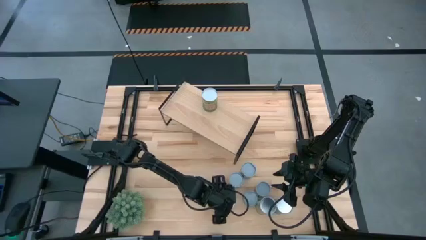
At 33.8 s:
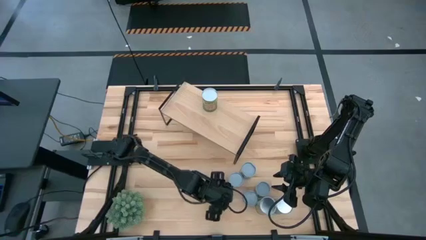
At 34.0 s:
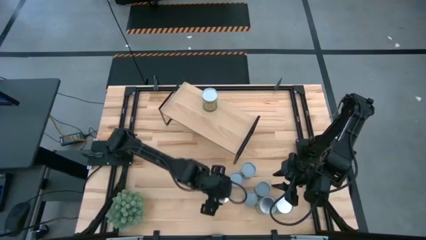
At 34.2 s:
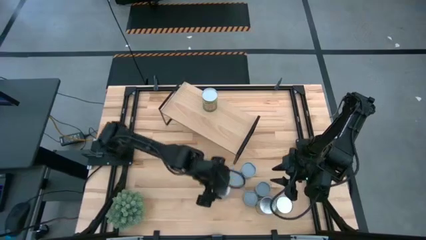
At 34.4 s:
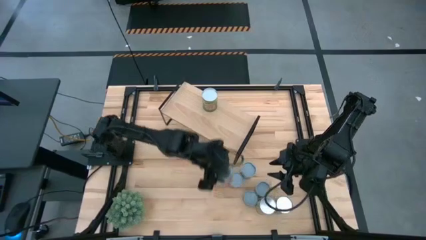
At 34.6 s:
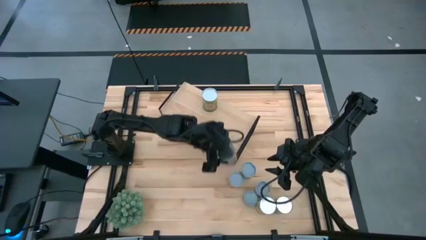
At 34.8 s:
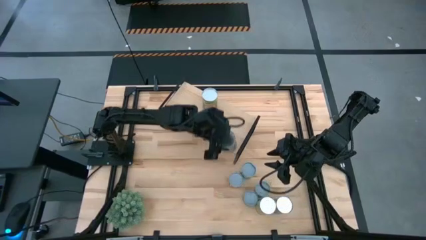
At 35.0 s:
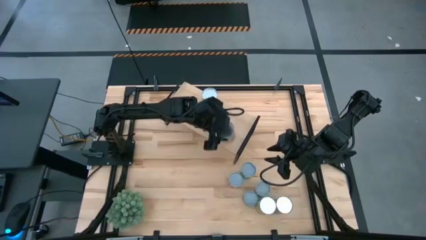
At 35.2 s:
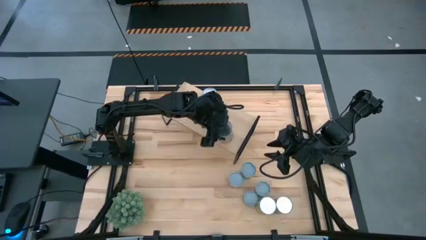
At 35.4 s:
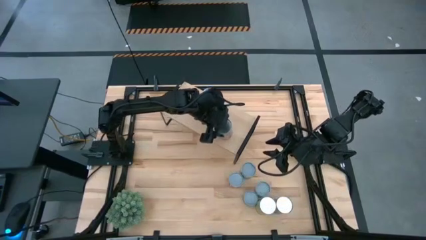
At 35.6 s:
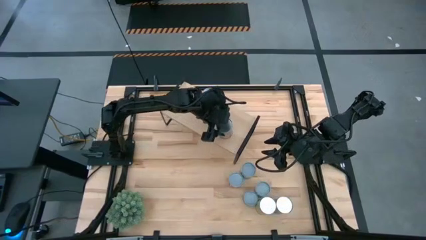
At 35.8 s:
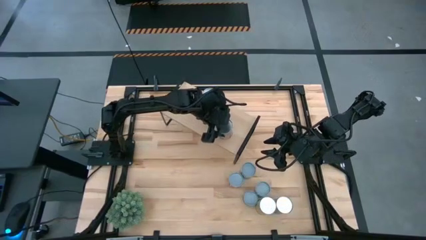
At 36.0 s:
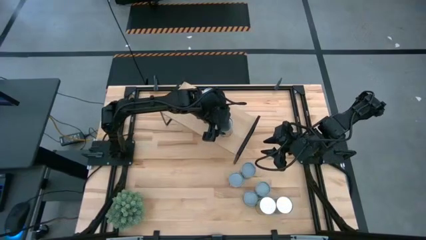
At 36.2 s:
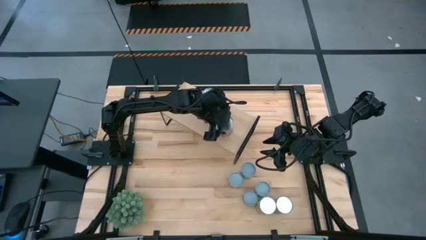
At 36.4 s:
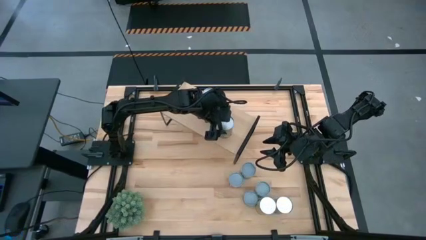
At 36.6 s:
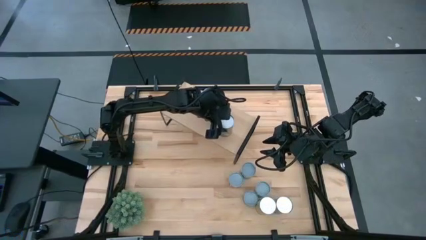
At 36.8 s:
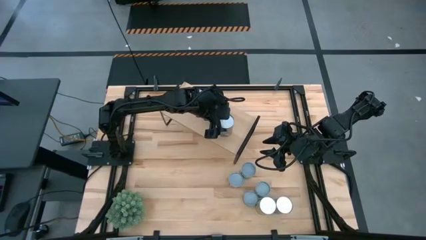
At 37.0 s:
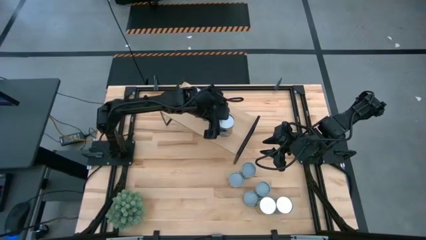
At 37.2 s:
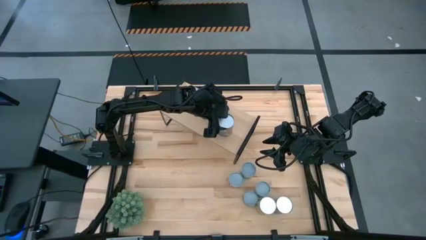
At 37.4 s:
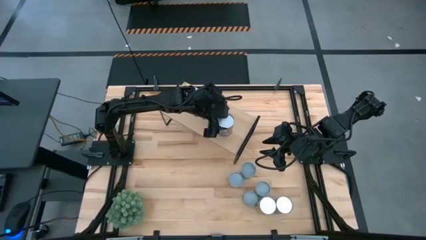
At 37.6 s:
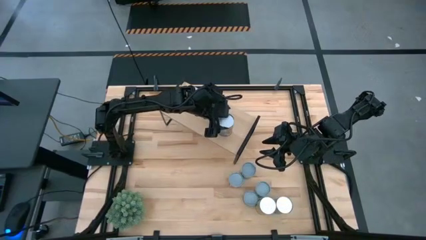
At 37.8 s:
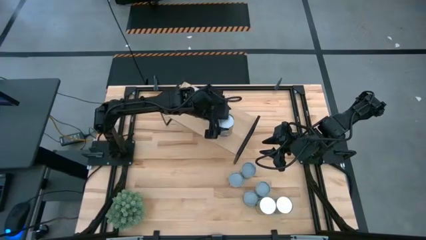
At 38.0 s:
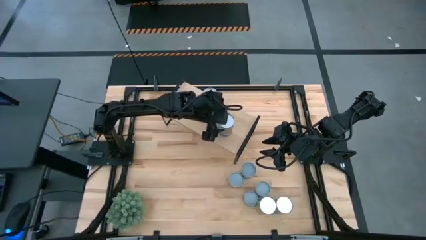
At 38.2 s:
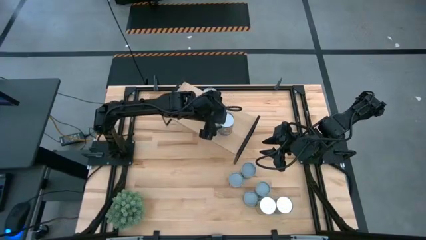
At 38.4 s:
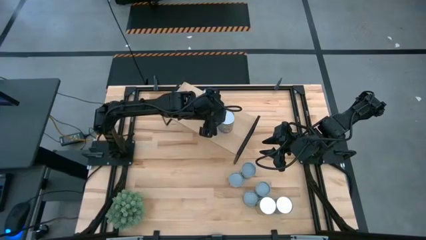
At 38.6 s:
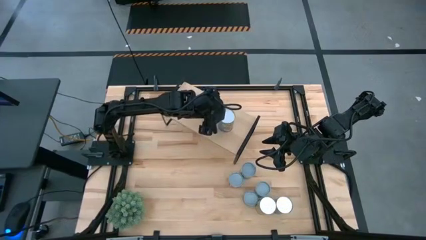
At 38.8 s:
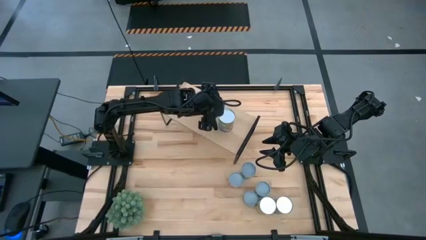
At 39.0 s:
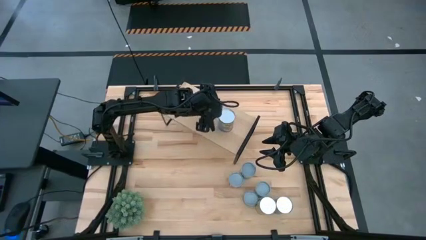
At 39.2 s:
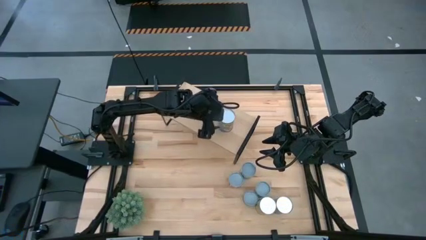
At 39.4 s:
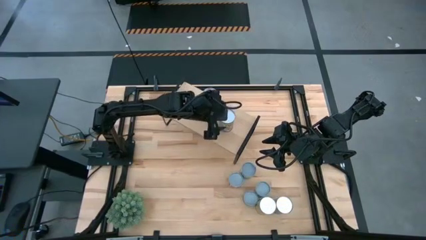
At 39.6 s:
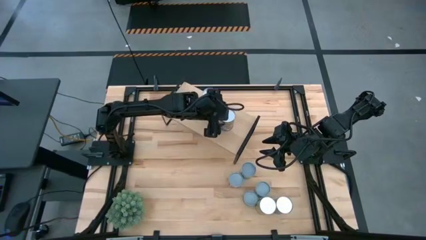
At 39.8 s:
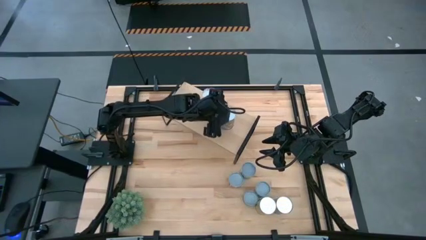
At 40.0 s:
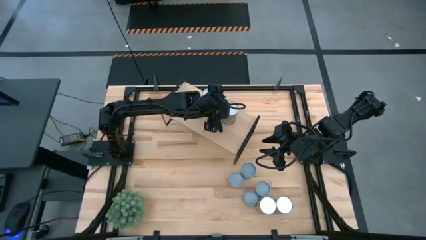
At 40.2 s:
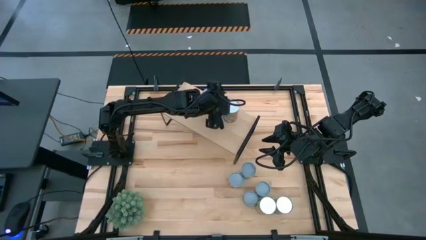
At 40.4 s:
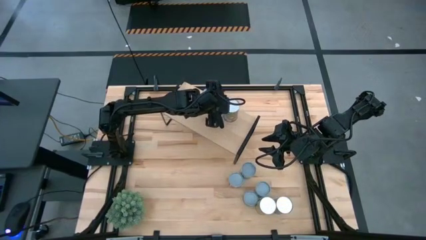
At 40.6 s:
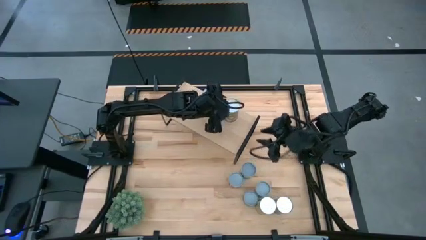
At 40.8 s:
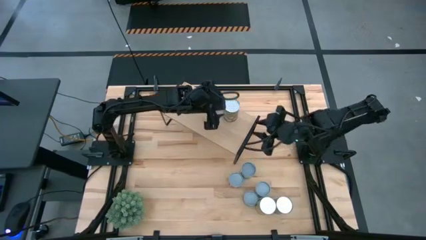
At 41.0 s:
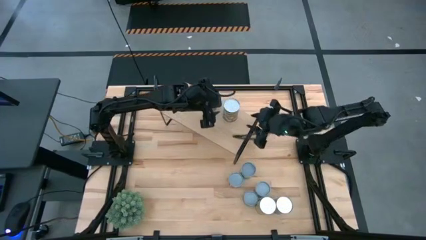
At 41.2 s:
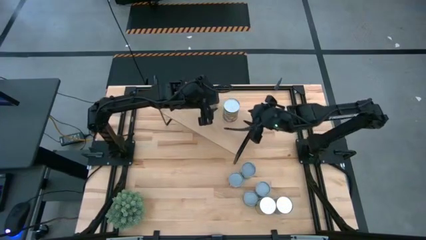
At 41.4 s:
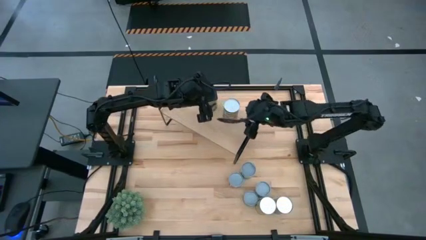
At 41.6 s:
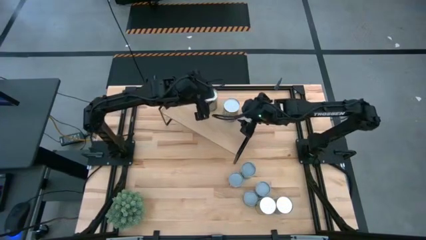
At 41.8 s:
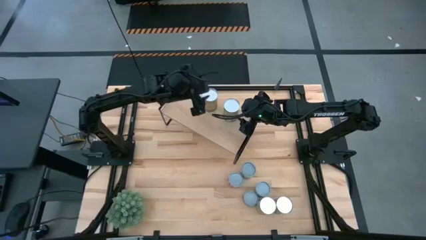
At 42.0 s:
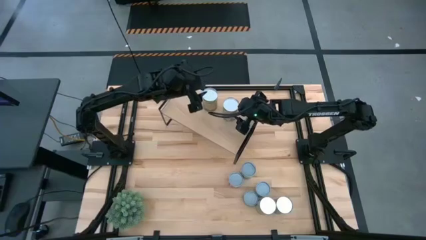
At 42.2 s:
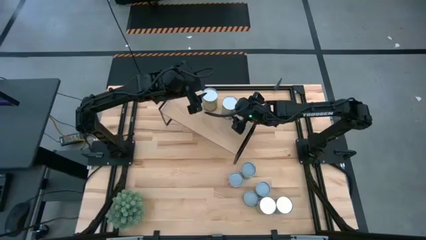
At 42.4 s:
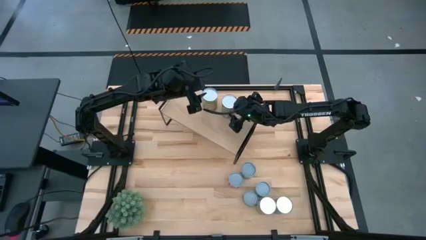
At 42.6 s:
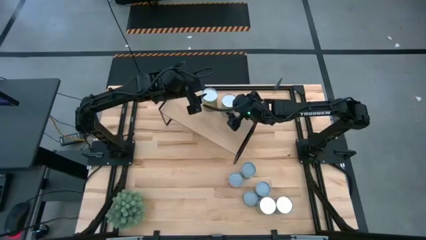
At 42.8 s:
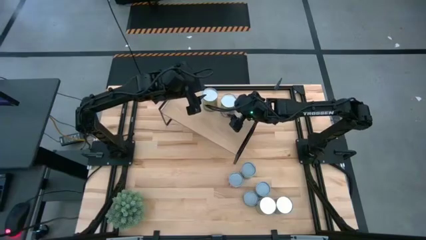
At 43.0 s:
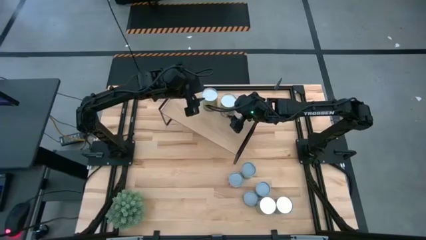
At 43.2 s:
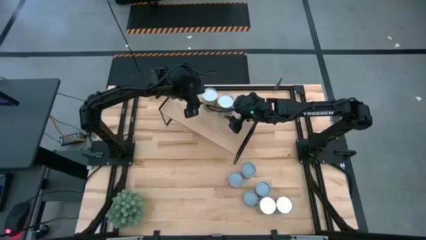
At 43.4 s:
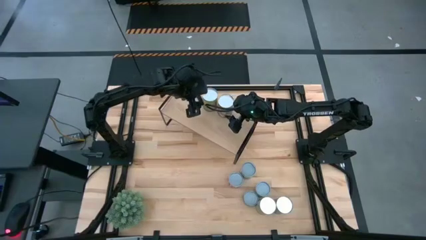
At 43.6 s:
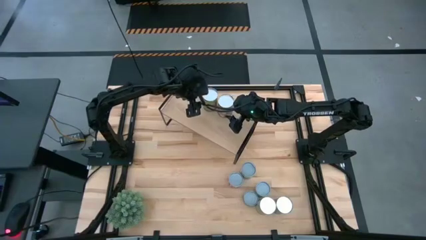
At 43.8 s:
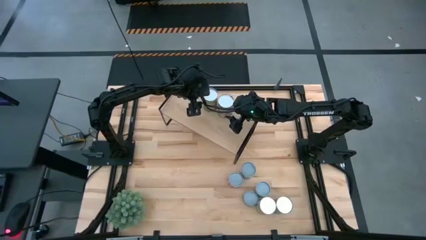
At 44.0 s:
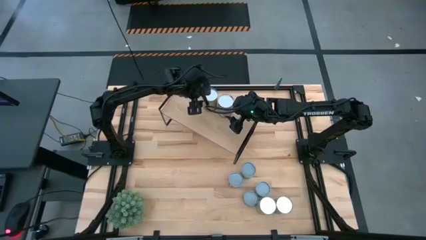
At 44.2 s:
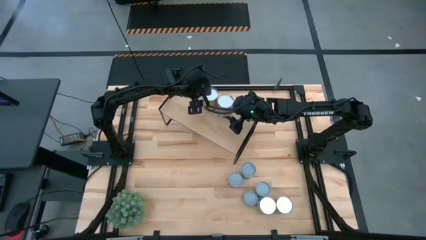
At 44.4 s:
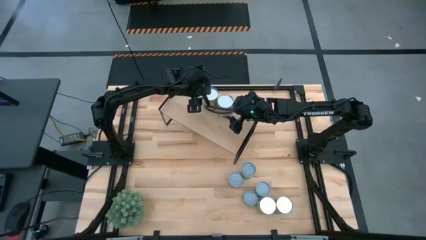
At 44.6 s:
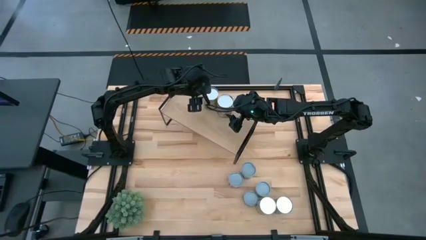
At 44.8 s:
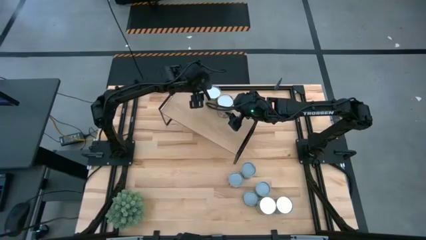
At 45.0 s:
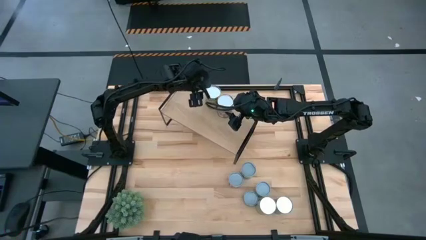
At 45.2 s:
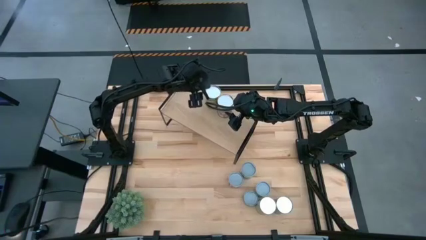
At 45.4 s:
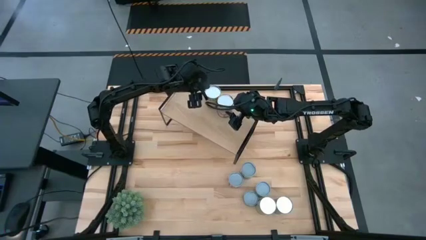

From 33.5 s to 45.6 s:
Task: Pick and place cans onto a shelf
Put the canned peaches on the shelf
